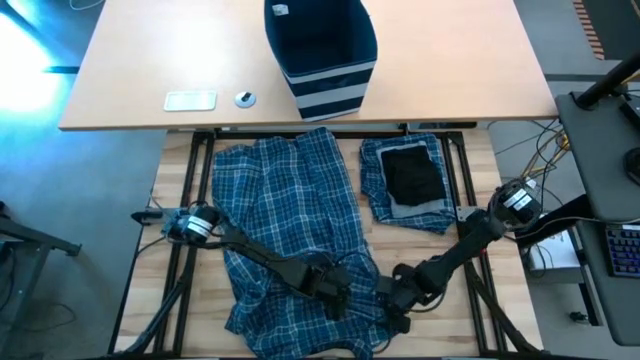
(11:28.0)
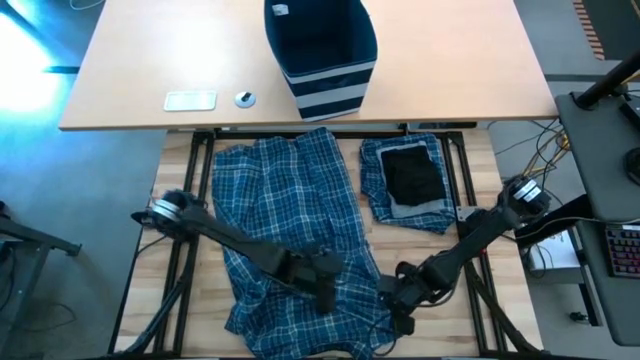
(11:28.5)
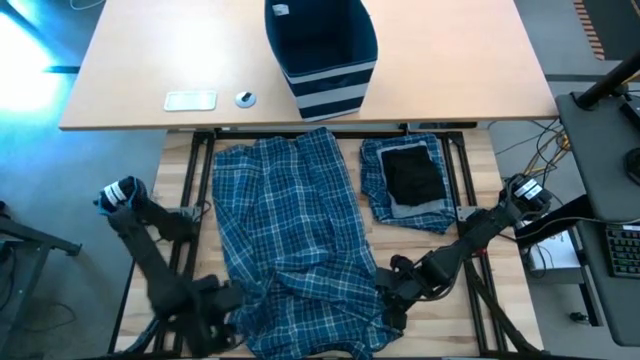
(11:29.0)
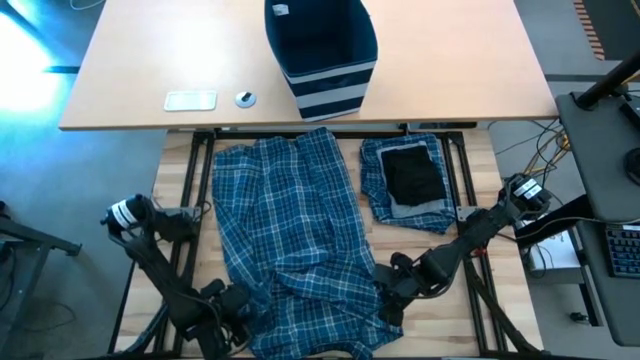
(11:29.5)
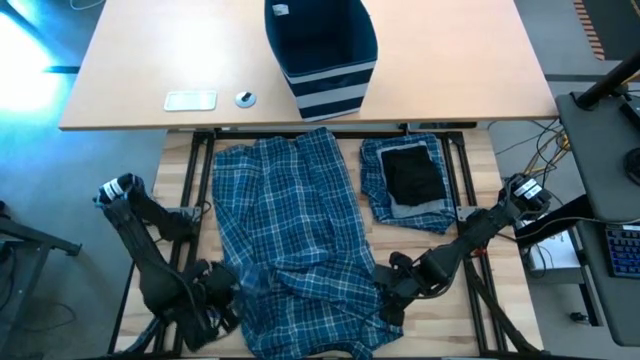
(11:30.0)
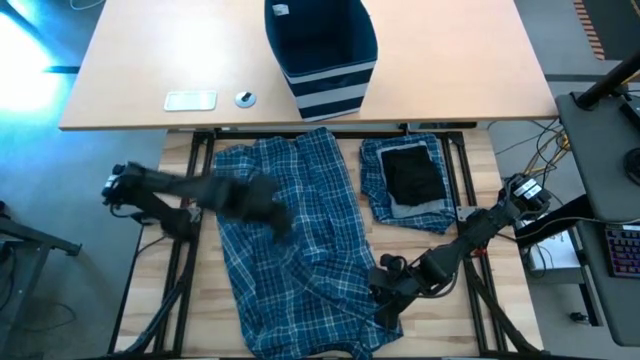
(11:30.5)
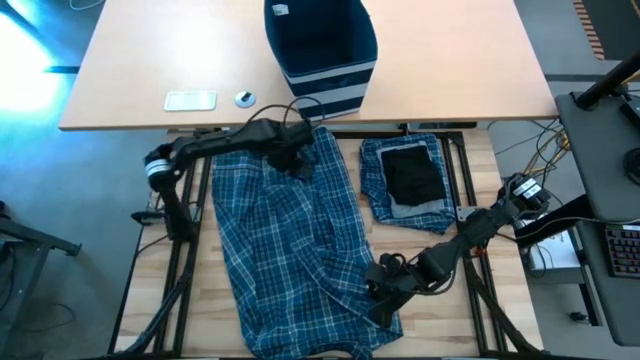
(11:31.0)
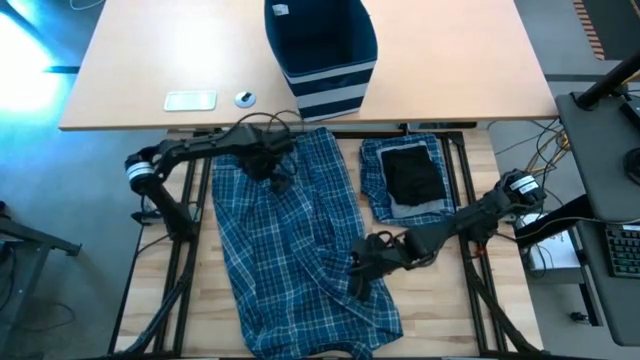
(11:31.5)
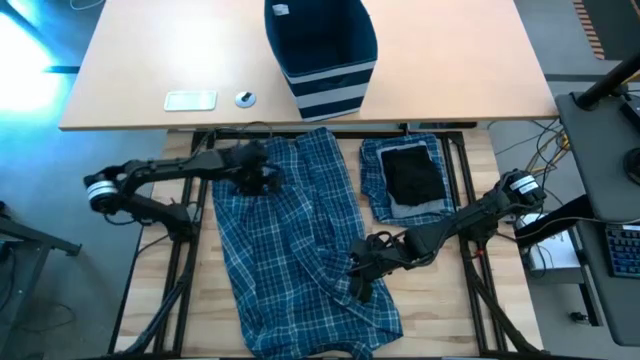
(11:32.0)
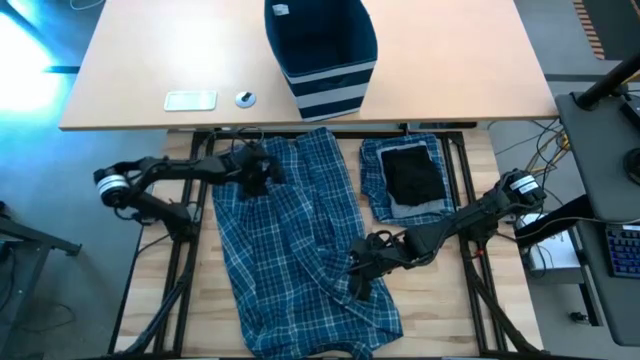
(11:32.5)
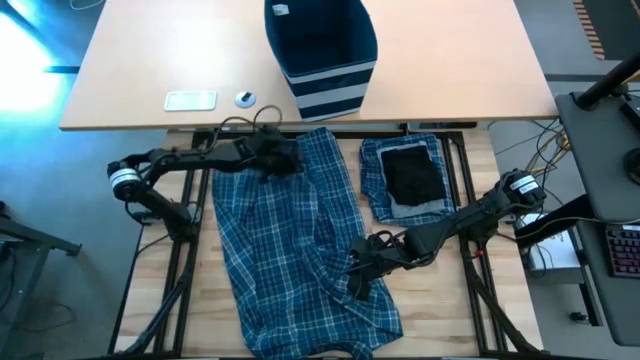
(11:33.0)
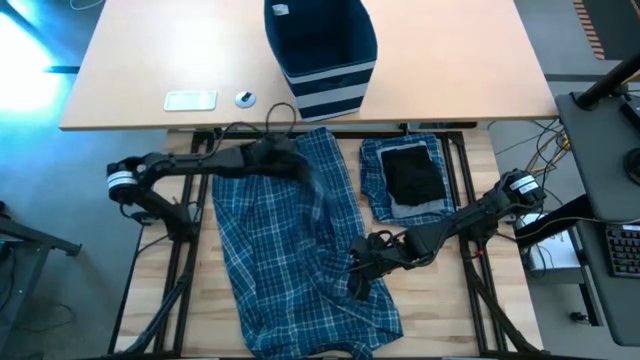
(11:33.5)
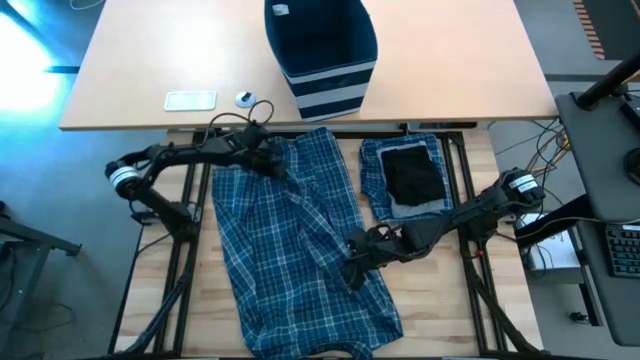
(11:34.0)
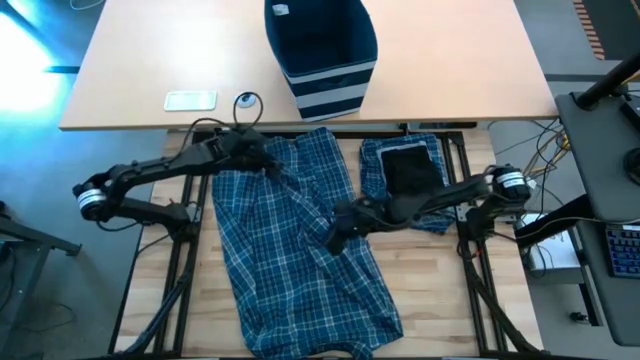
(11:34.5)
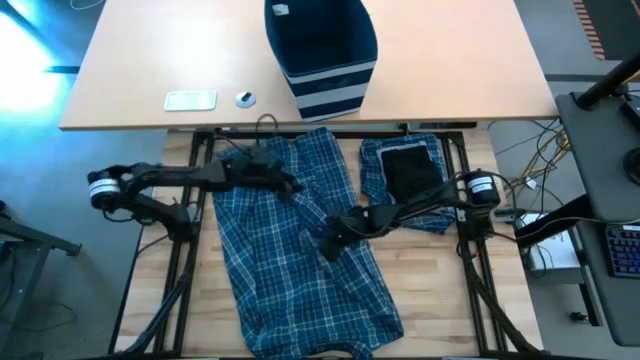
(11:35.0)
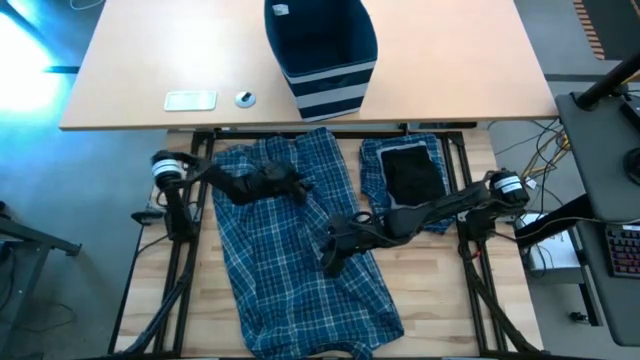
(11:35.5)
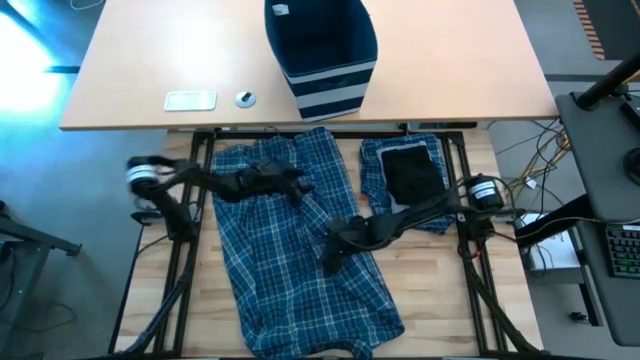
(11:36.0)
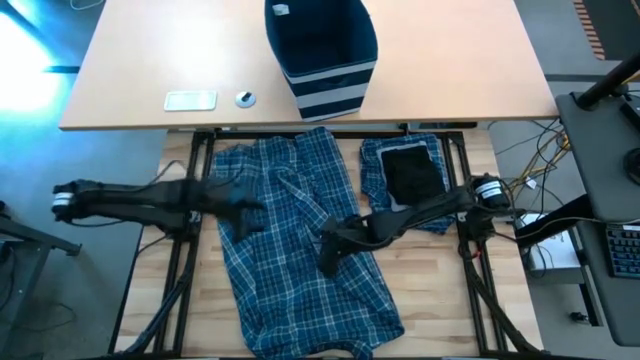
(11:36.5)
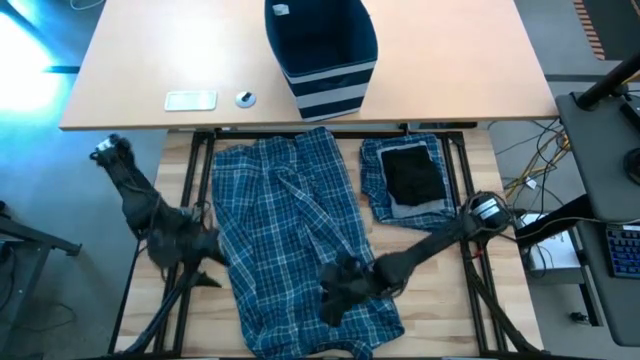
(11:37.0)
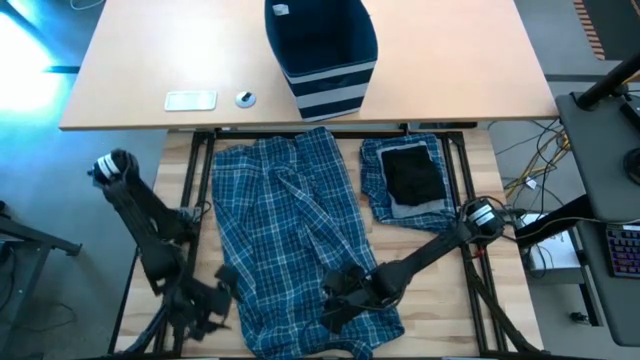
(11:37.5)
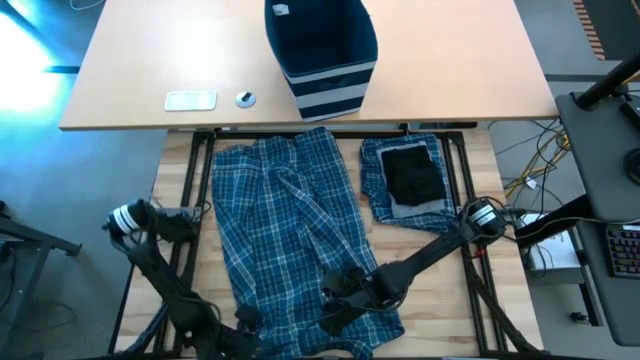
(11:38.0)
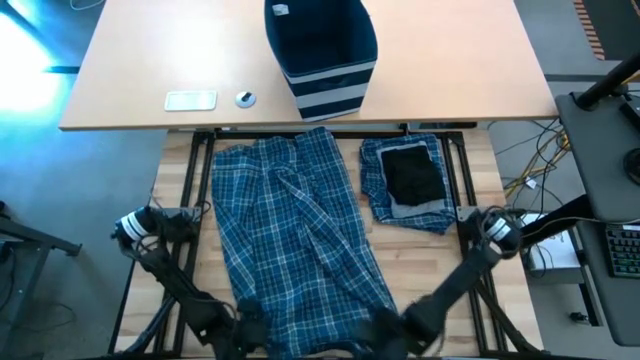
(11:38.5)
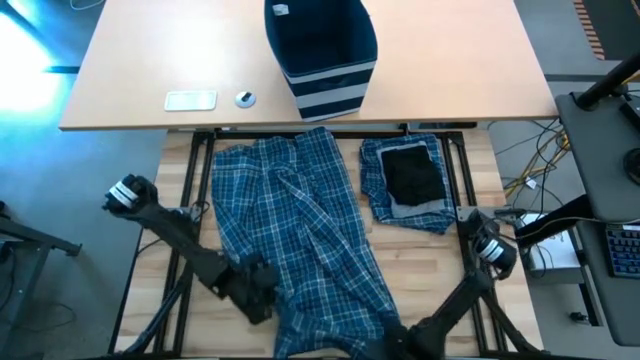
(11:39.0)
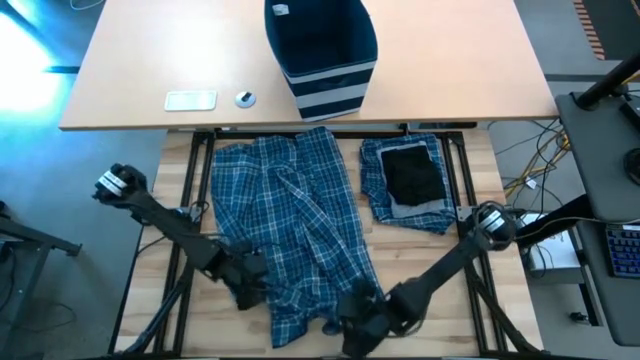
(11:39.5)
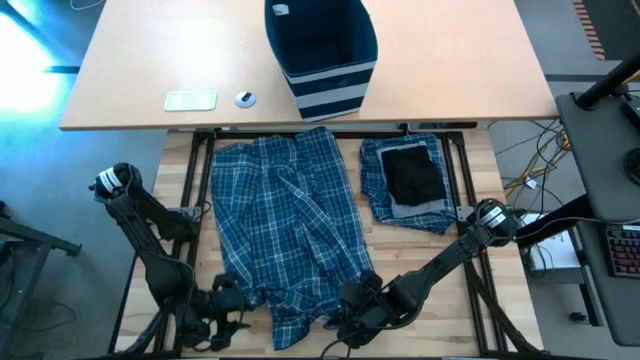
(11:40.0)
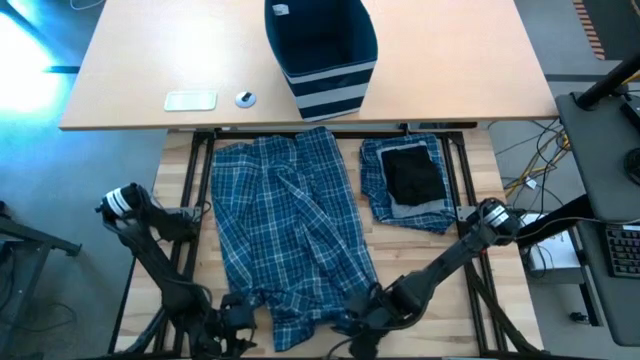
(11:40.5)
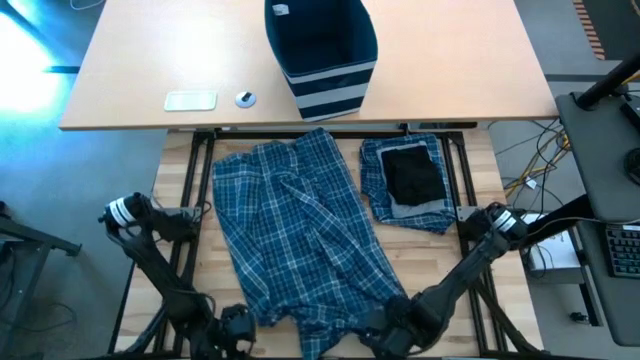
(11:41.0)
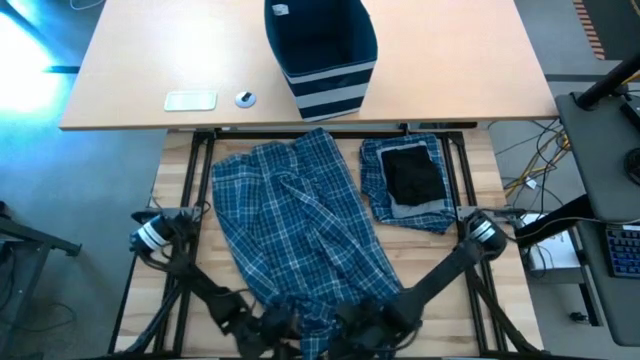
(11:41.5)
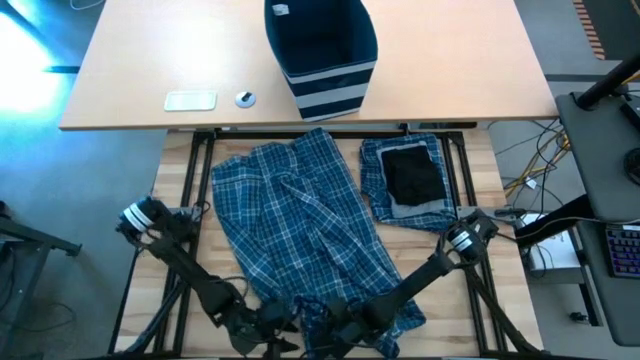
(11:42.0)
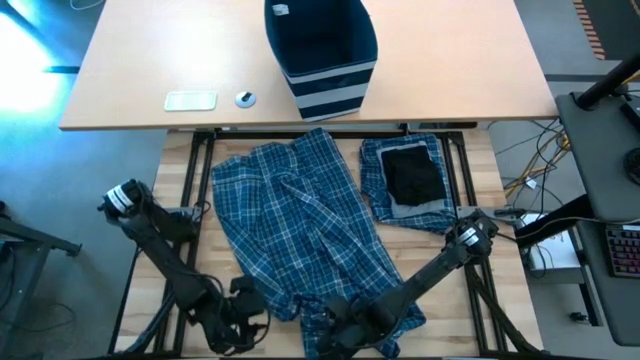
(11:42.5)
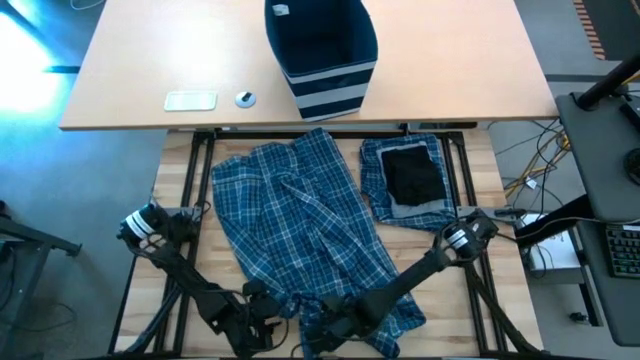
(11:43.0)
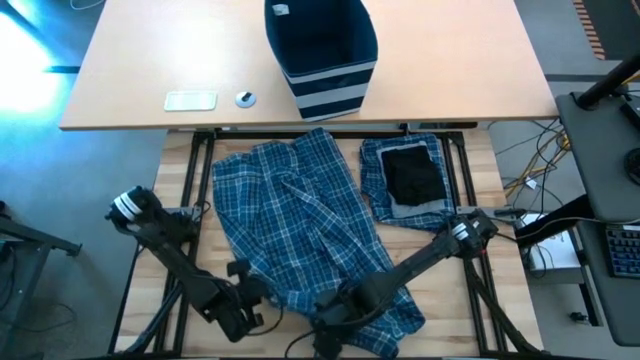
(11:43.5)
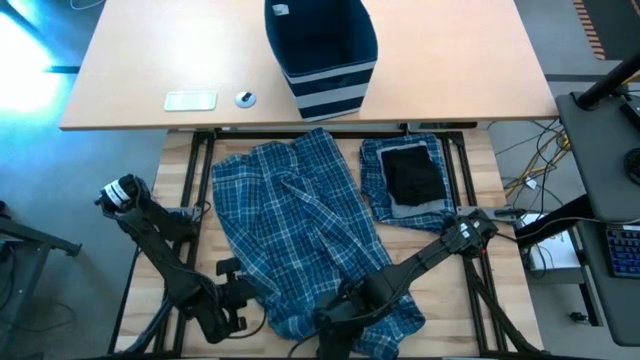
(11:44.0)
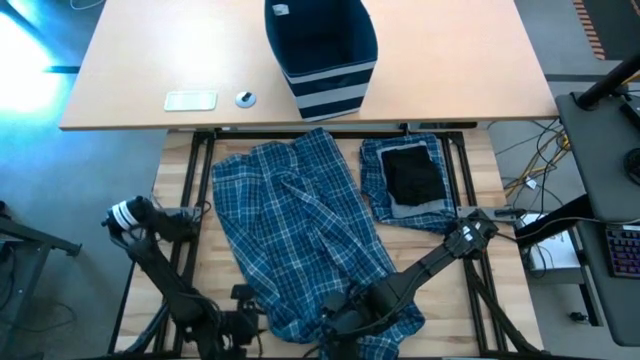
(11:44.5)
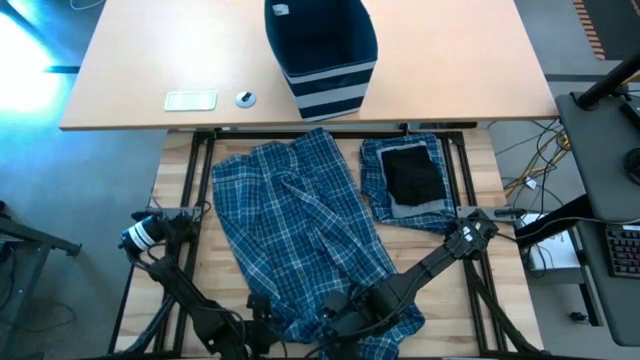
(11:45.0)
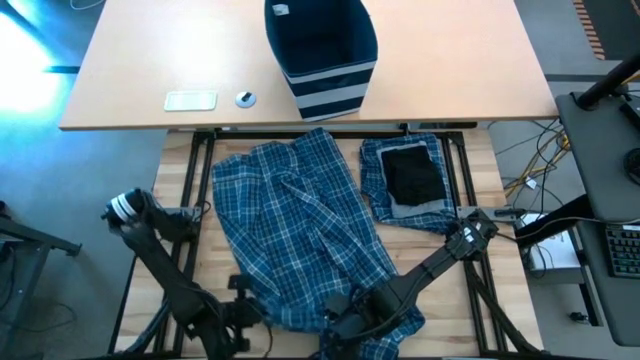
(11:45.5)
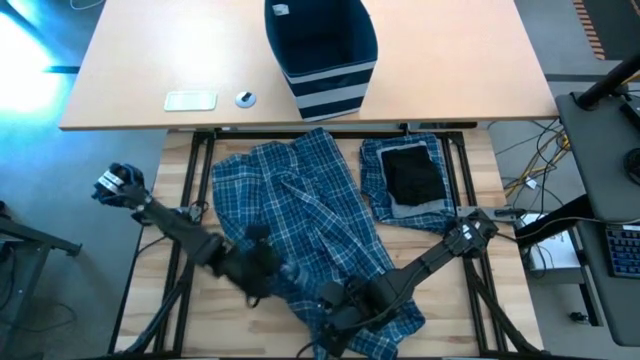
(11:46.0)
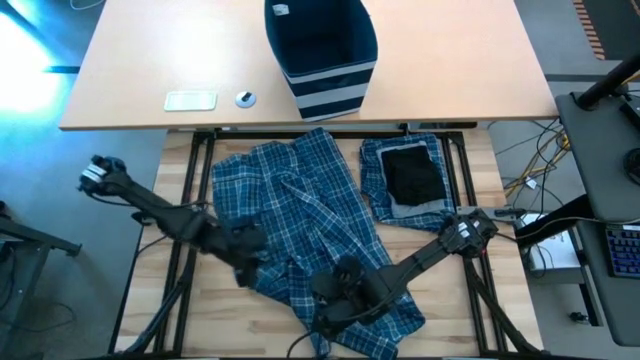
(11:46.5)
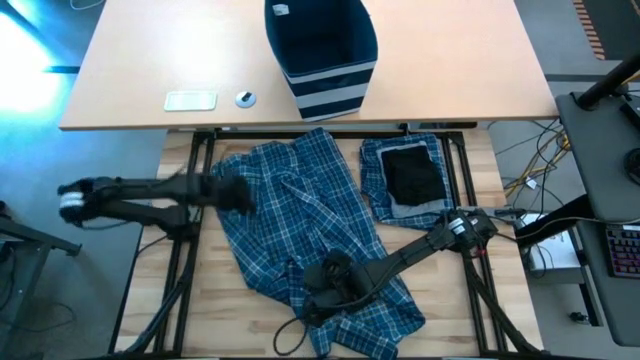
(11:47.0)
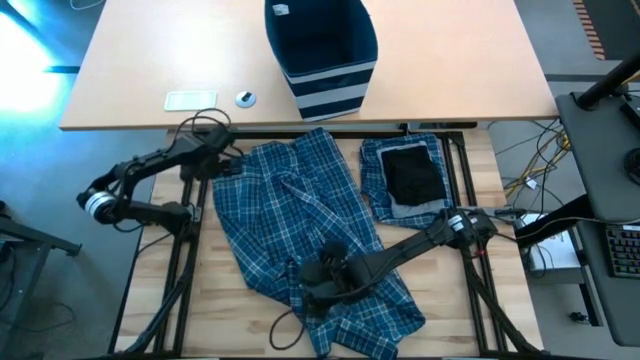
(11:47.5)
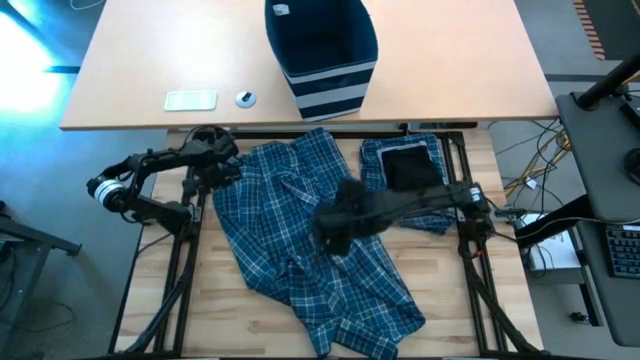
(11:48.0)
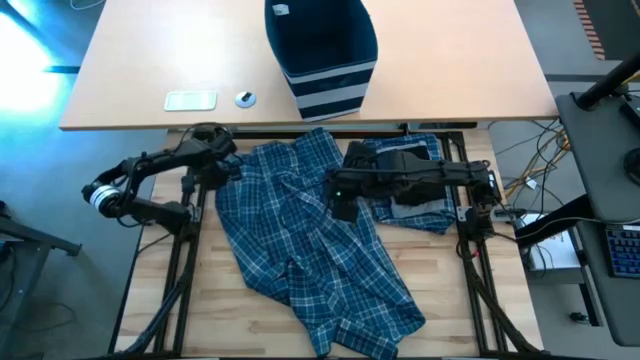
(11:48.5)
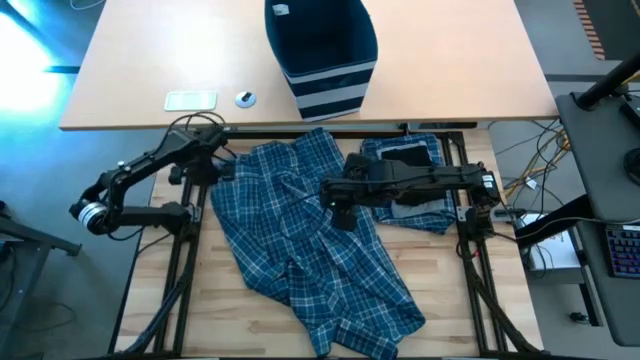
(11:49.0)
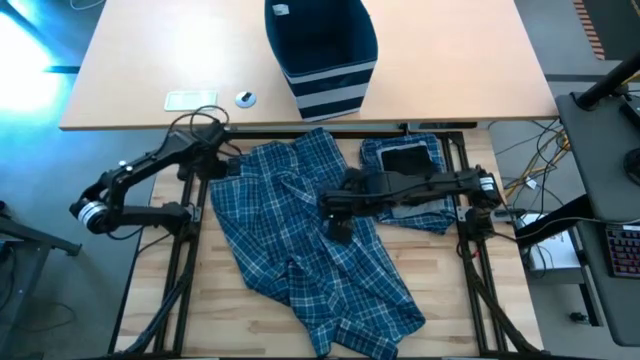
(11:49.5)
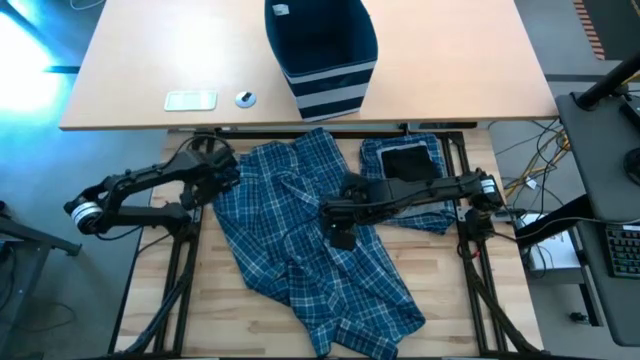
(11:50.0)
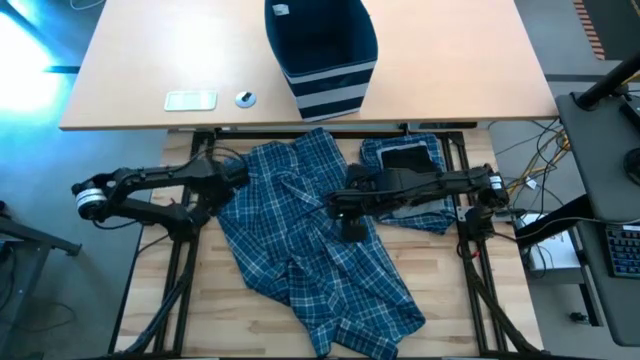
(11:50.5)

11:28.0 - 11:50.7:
Task: Fold Laundry from Bin
Fold the blue patterned long sleeve
